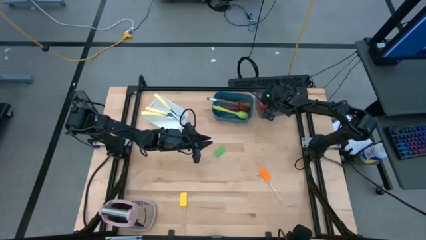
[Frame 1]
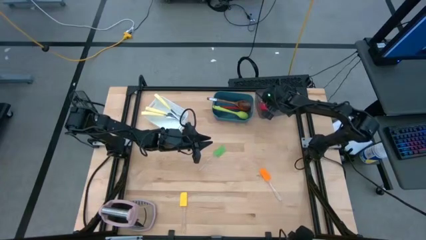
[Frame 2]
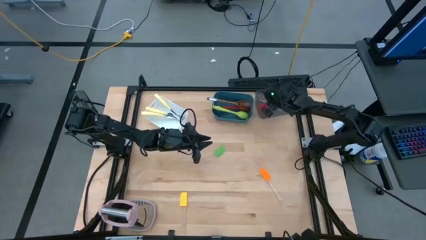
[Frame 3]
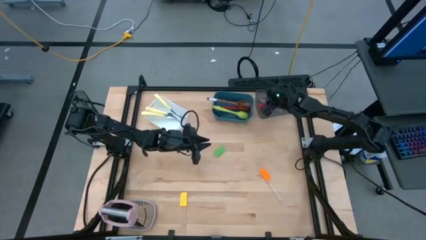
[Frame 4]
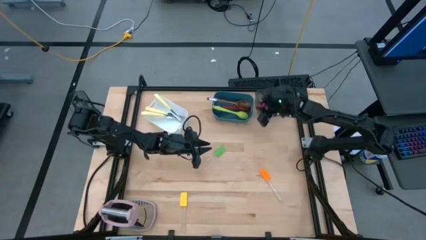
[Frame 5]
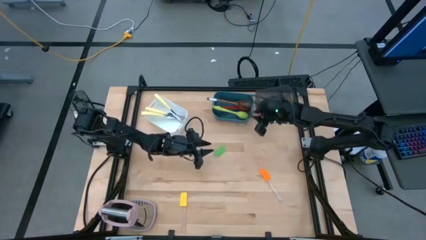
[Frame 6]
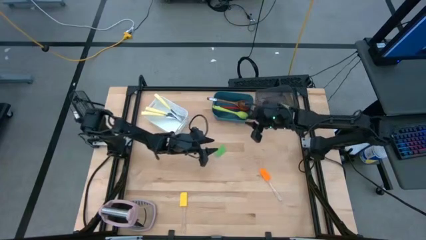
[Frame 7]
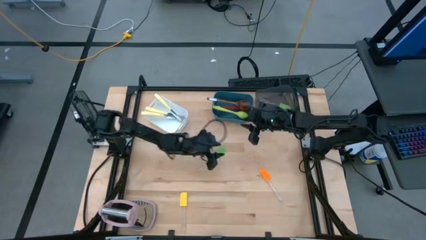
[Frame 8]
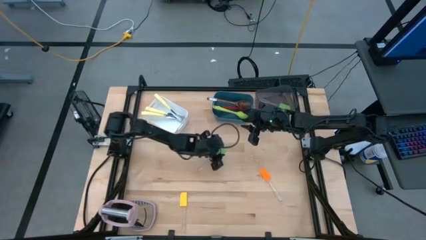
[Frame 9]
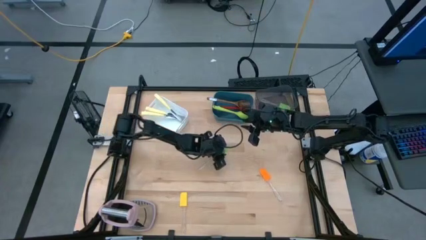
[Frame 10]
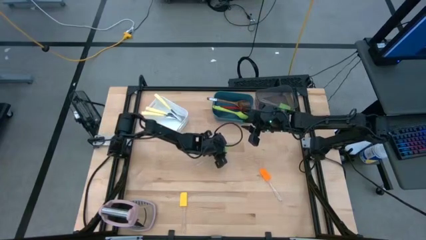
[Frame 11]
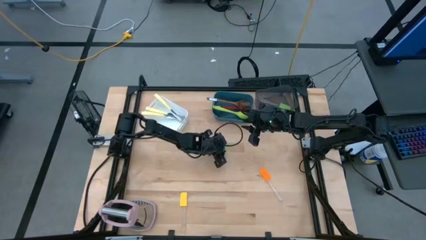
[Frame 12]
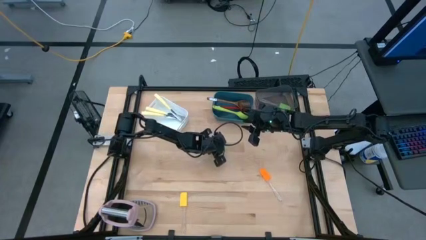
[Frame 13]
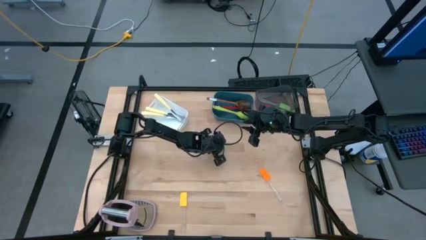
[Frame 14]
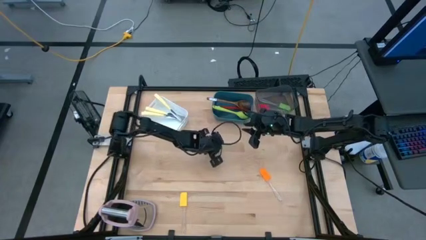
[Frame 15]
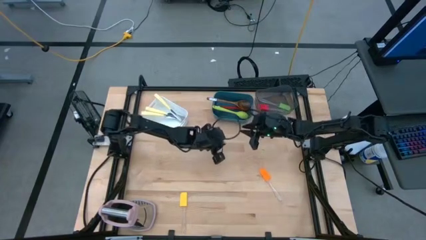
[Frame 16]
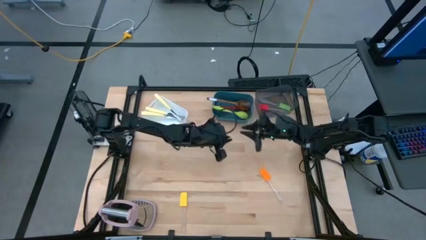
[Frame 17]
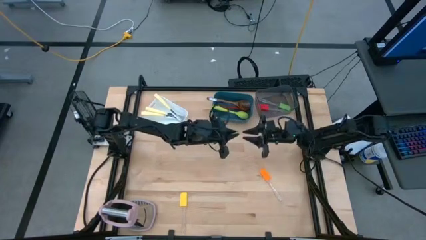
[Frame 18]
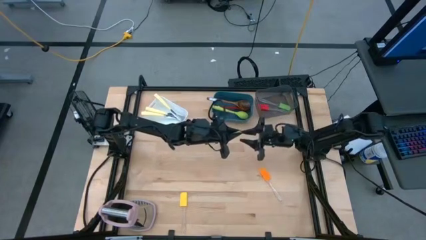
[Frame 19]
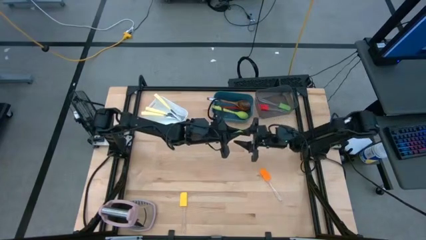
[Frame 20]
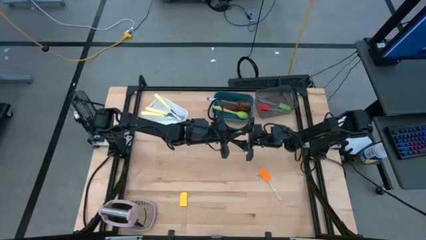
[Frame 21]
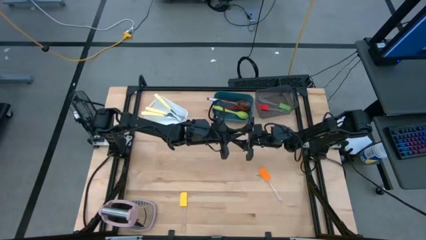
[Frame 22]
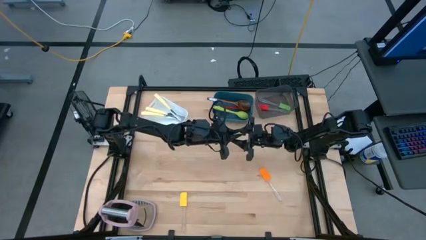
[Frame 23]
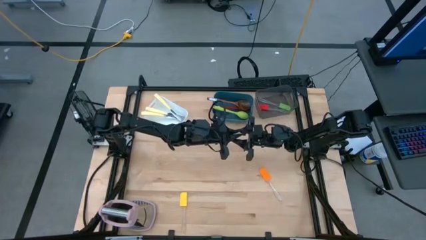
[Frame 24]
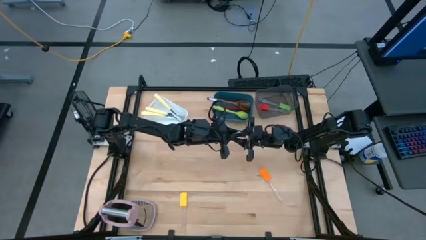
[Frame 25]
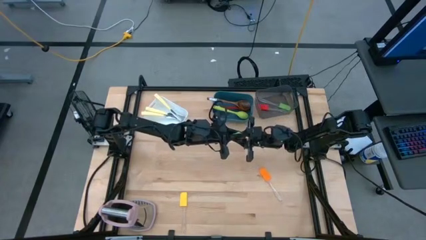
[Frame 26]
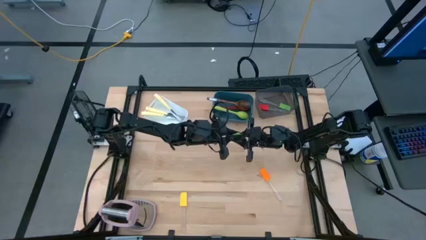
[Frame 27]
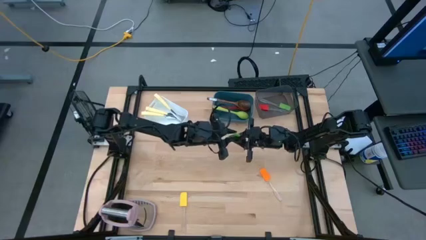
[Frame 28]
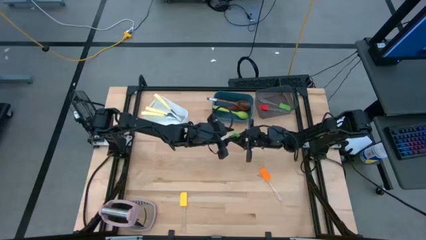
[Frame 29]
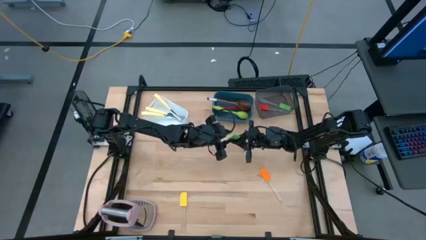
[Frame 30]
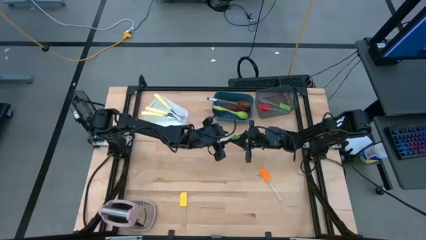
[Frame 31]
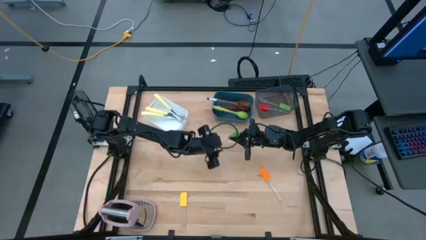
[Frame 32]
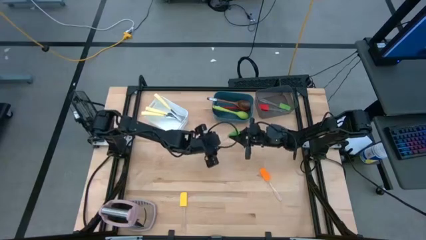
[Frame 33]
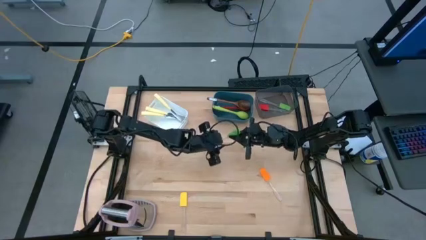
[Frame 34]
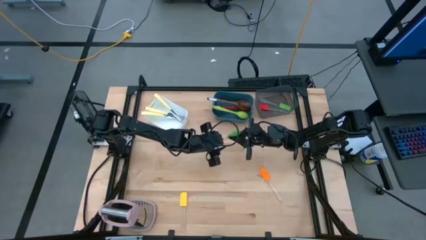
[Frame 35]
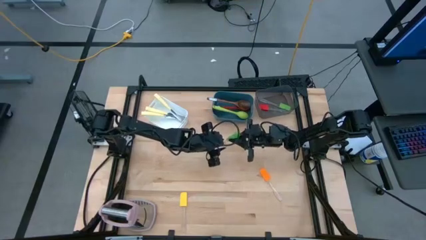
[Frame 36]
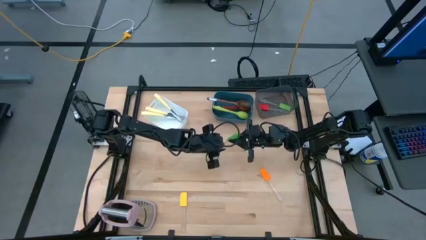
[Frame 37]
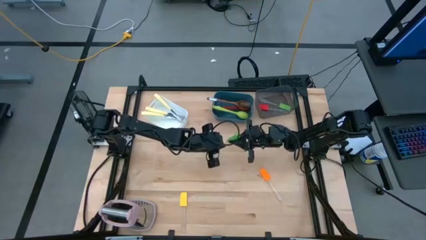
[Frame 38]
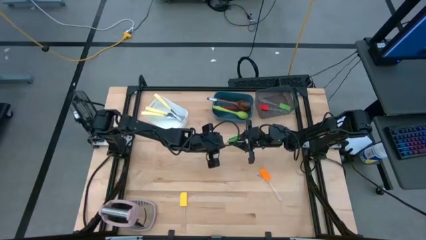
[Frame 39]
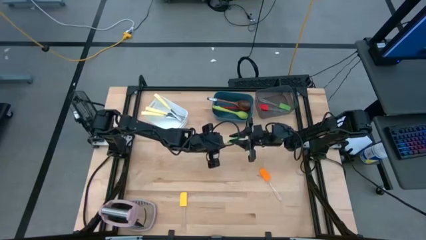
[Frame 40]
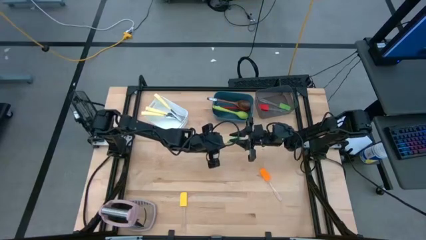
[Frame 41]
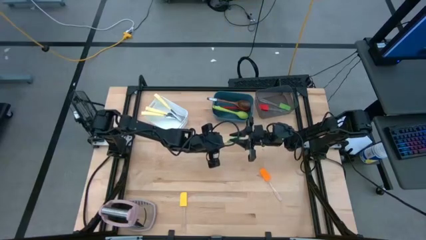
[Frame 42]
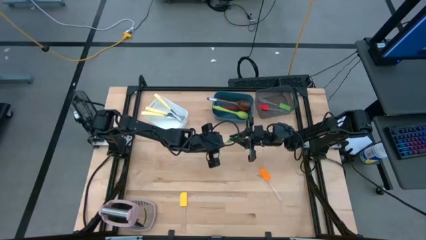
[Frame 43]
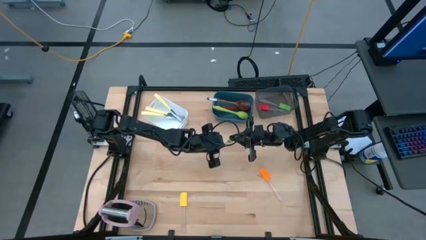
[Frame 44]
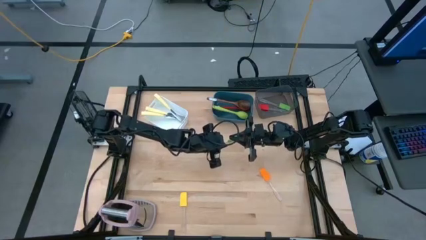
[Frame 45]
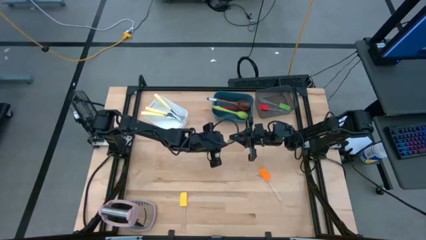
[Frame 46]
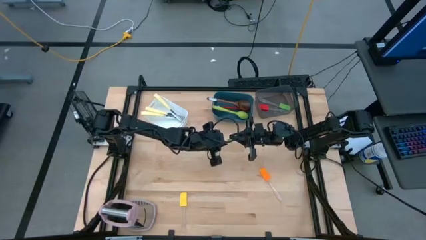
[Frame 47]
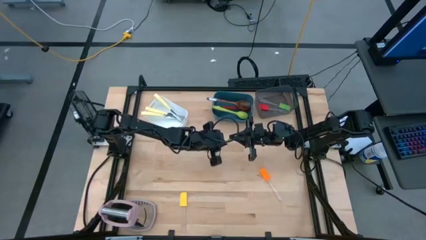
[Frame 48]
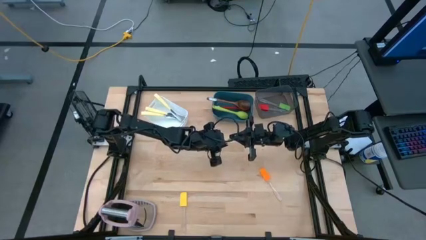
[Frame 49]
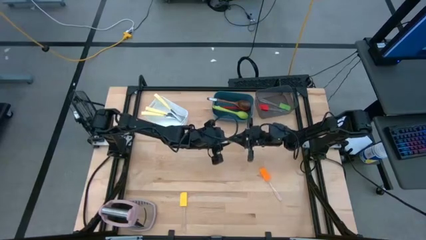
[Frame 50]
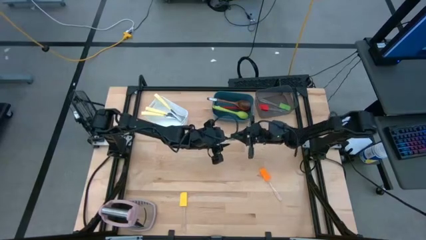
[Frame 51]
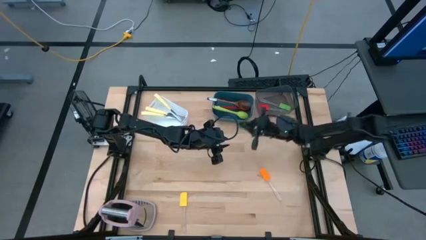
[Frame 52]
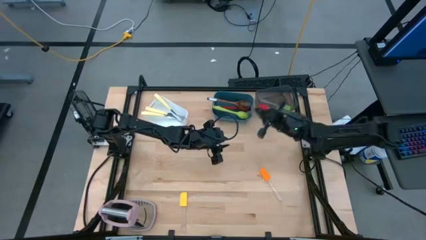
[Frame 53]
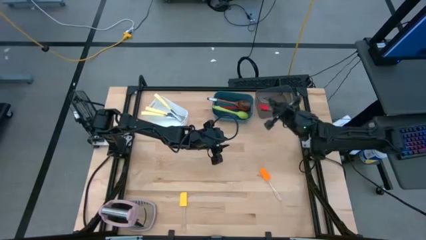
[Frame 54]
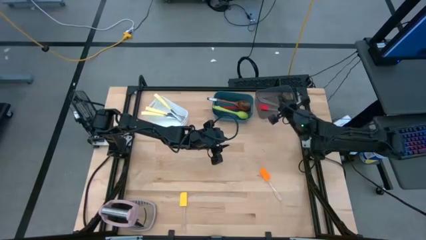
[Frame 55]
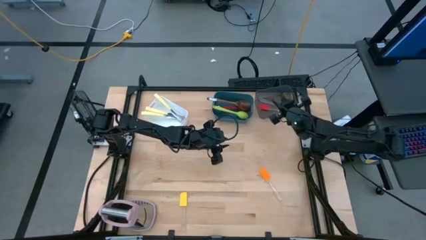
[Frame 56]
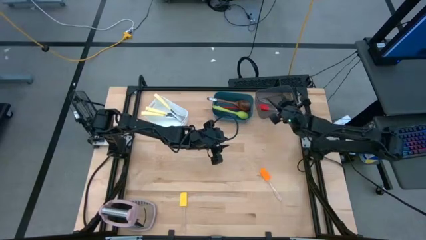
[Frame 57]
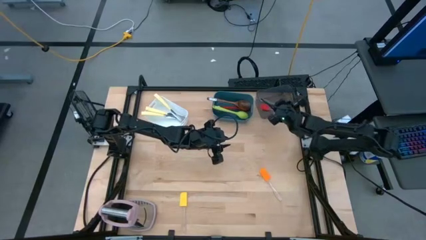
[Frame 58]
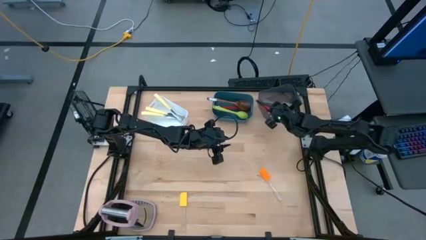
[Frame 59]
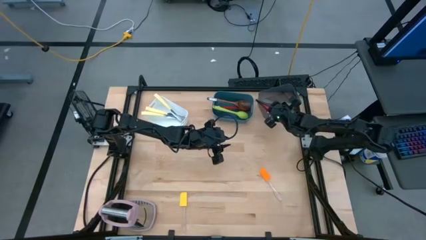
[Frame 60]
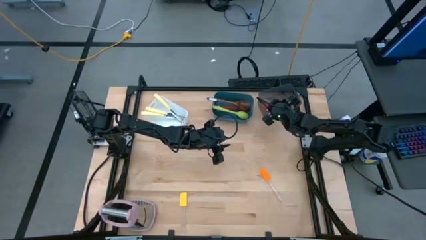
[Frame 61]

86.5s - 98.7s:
Task: Pick & Place Kitchen Items
Put the green spatula into the black bin

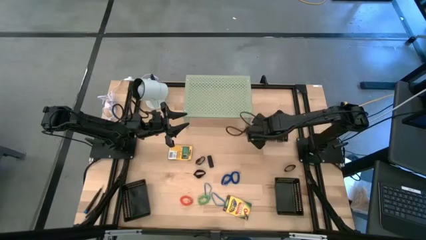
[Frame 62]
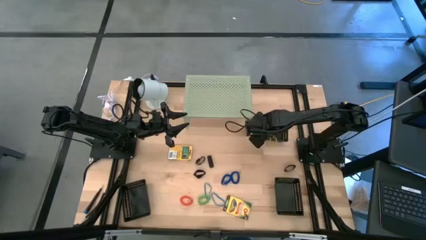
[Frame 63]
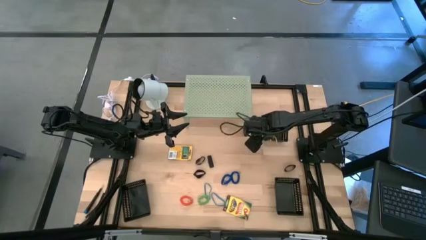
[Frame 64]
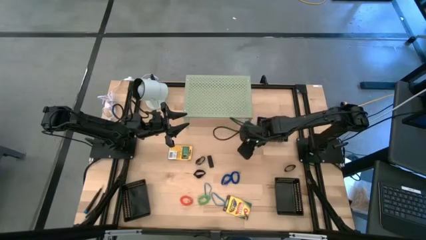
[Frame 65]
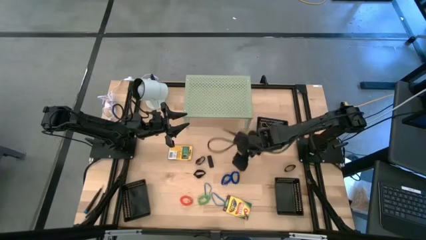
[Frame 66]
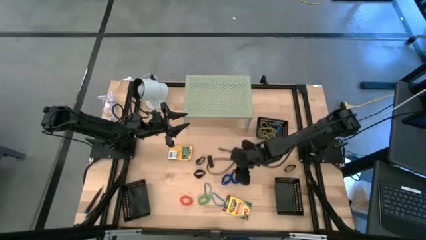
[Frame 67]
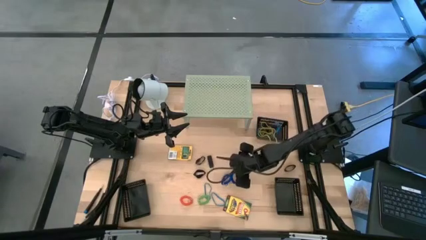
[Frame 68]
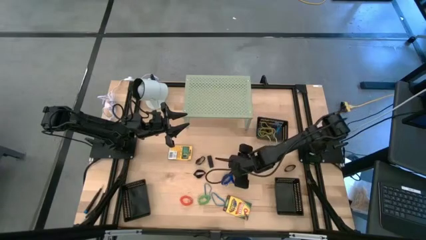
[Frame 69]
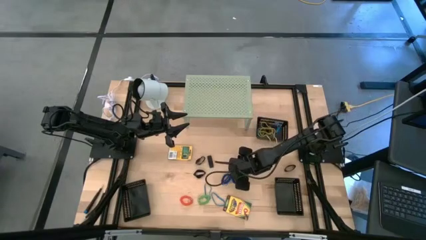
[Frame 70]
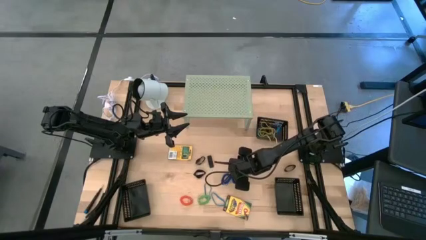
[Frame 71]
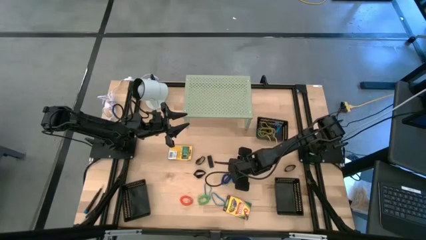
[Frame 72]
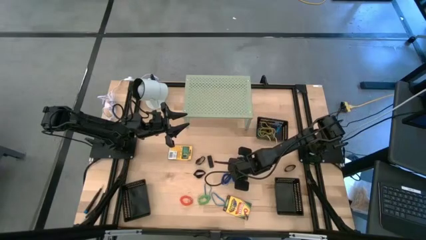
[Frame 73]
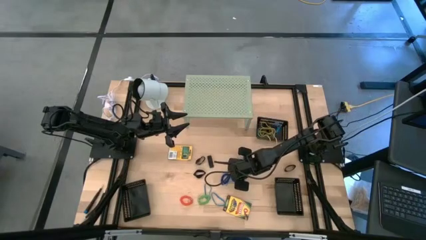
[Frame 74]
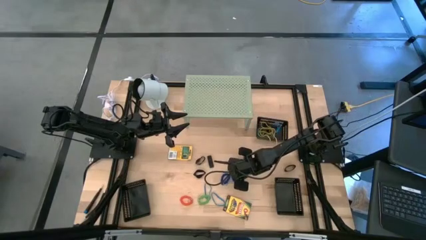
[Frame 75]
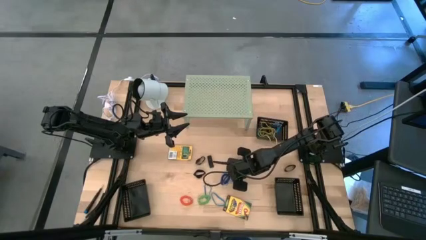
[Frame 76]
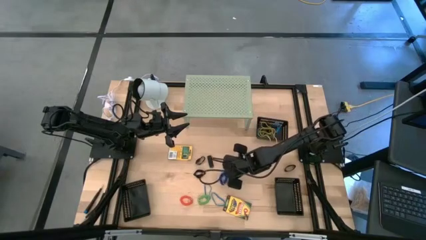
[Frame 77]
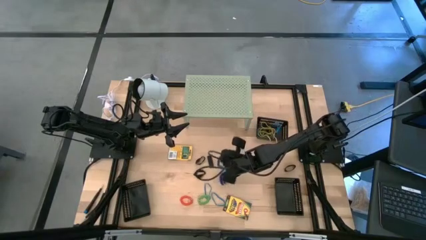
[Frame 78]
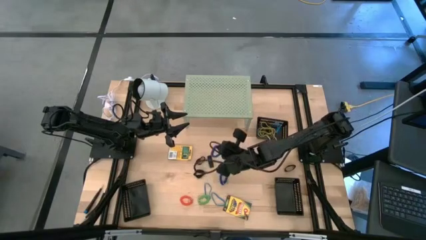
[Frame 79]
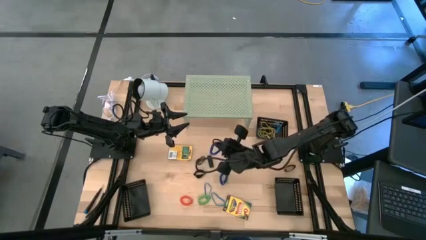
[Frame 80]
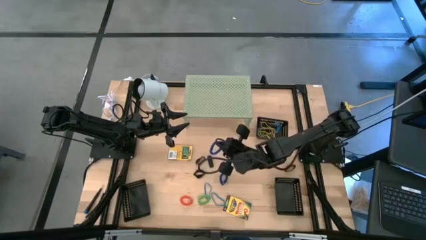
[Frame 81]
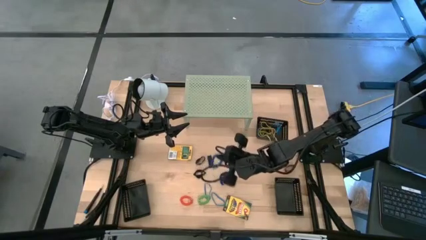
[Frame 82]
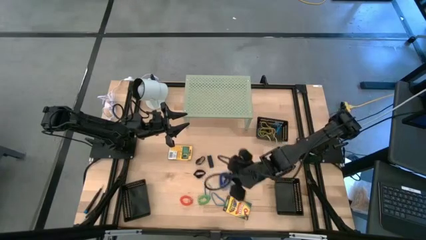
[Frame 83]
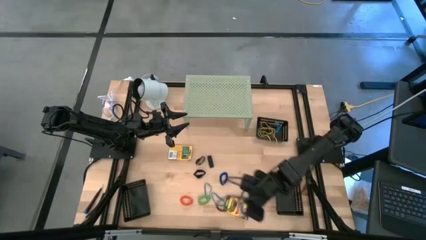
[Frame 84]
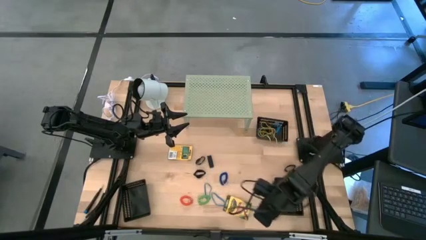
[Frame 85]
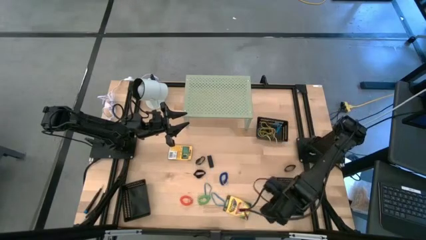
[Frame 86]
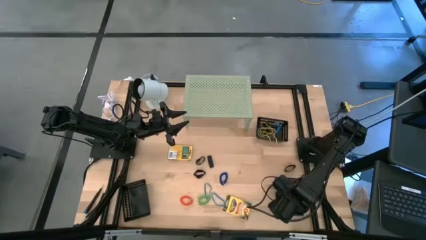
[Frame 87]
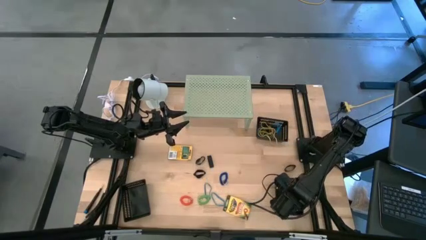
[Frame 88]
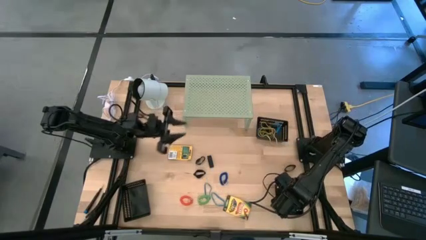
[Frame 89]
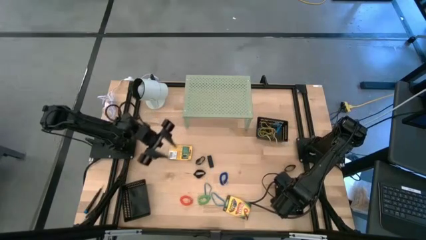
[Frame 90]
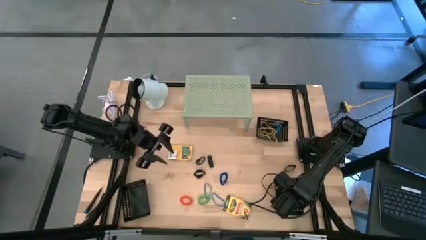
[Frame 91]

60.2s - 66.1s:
Task: Pick & Place Office Desk Supplies
Put the blue spring keychain into the bottom right black bin
